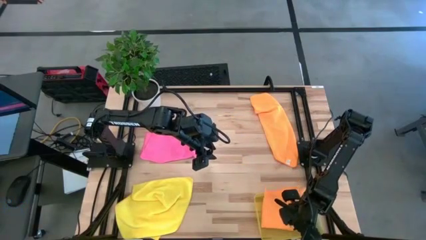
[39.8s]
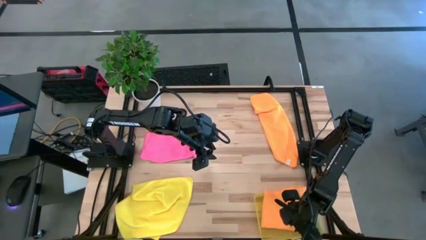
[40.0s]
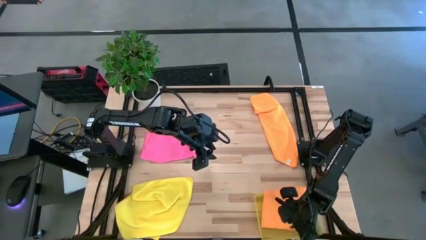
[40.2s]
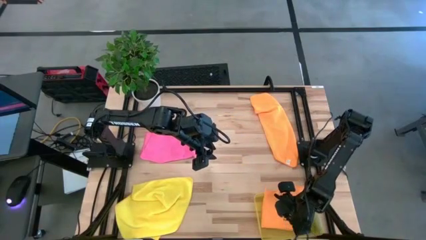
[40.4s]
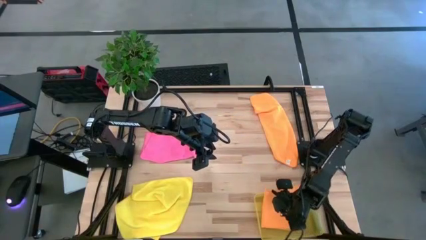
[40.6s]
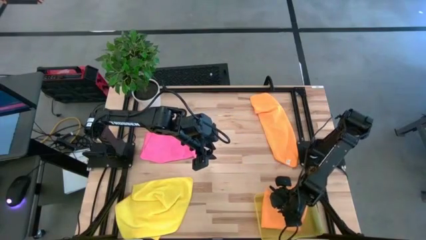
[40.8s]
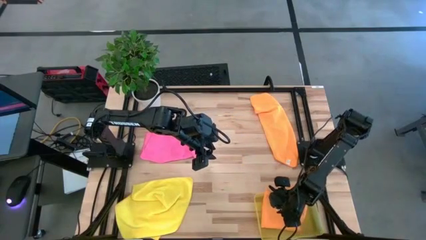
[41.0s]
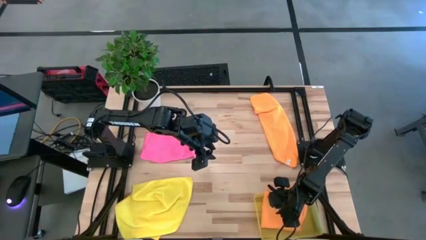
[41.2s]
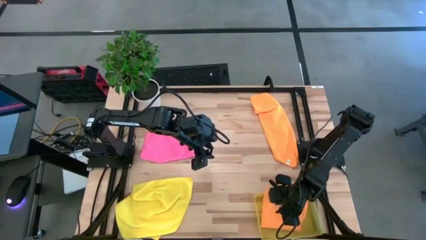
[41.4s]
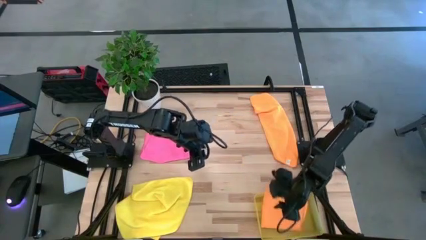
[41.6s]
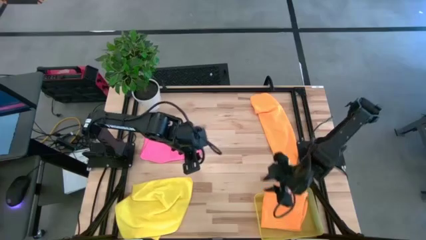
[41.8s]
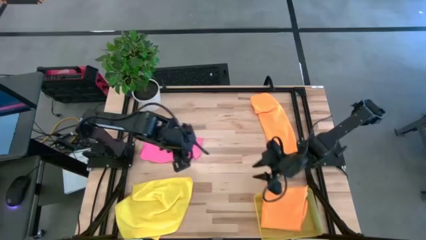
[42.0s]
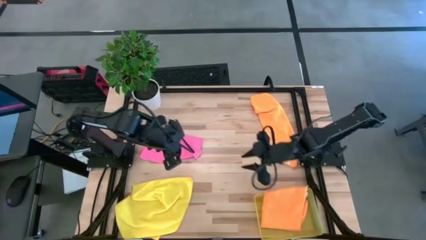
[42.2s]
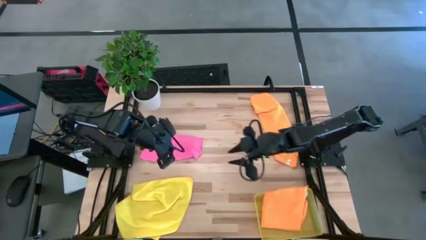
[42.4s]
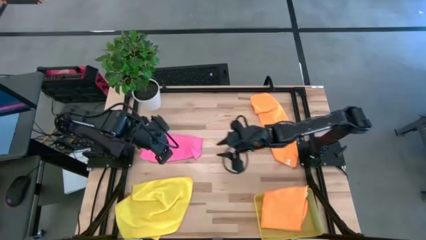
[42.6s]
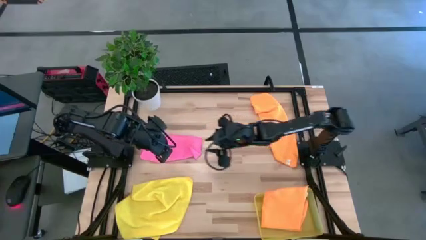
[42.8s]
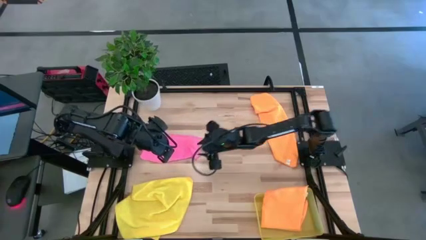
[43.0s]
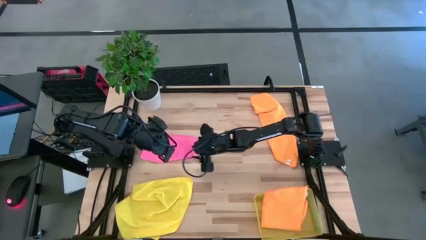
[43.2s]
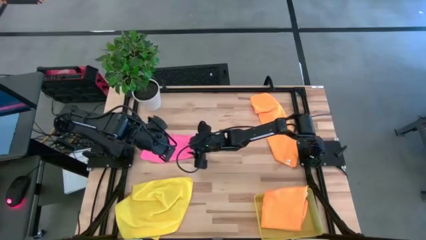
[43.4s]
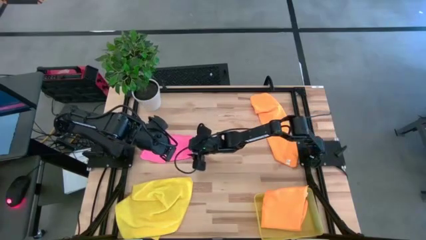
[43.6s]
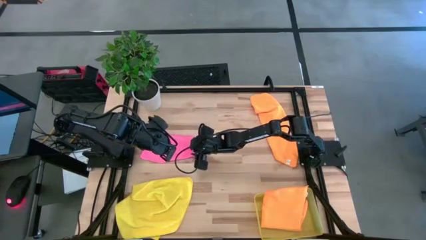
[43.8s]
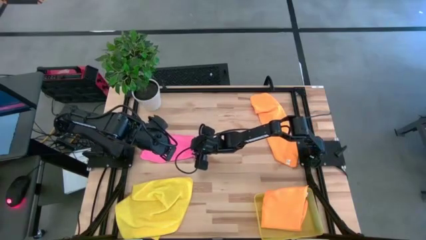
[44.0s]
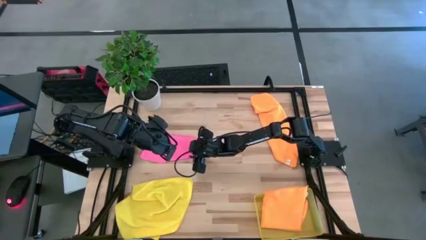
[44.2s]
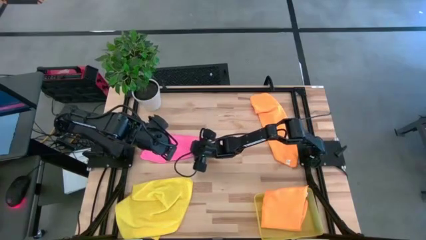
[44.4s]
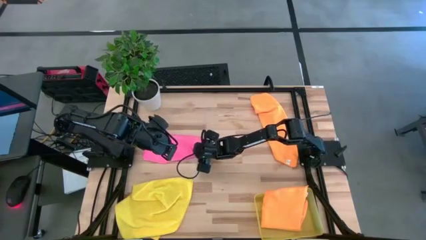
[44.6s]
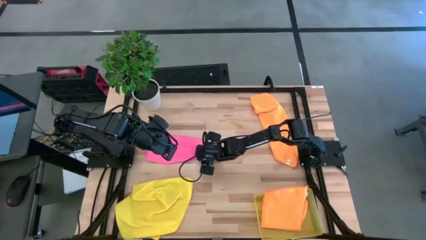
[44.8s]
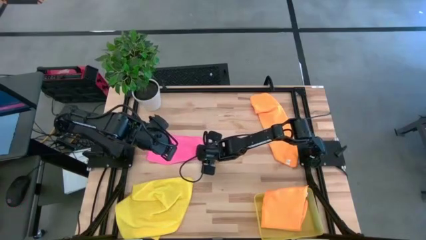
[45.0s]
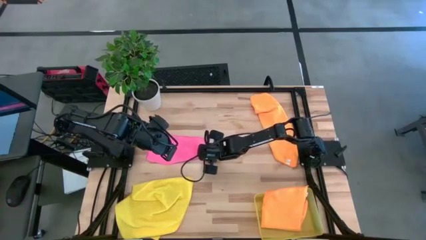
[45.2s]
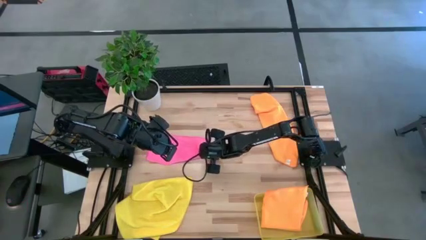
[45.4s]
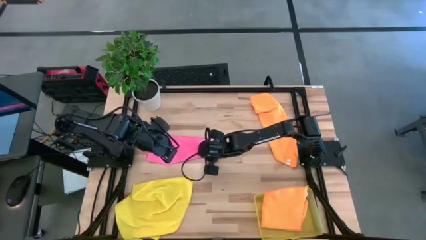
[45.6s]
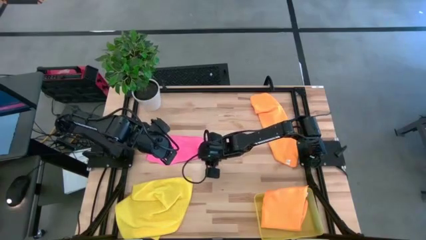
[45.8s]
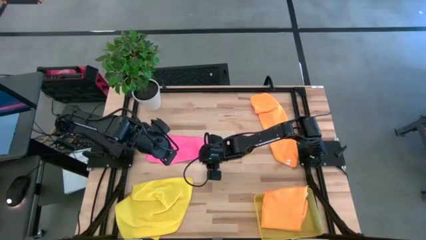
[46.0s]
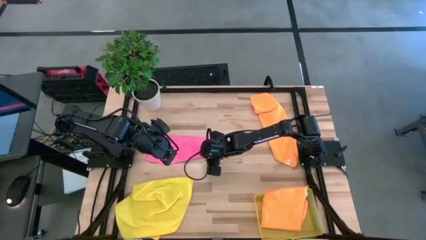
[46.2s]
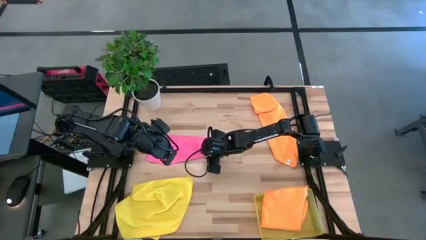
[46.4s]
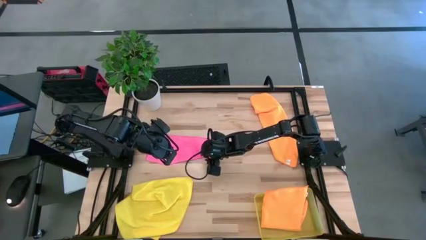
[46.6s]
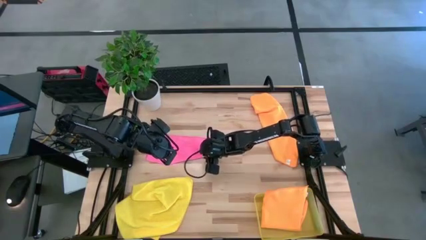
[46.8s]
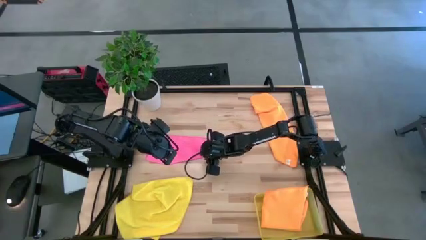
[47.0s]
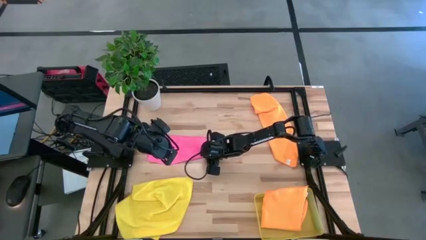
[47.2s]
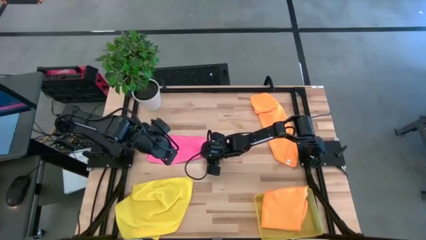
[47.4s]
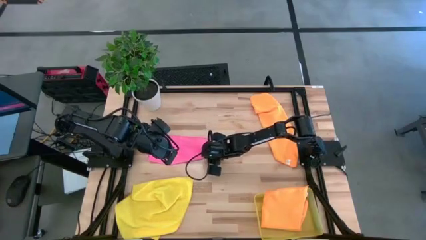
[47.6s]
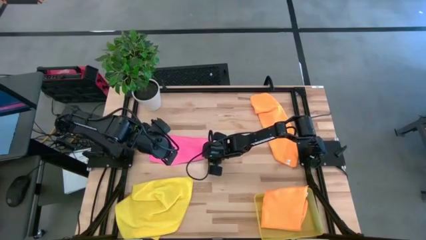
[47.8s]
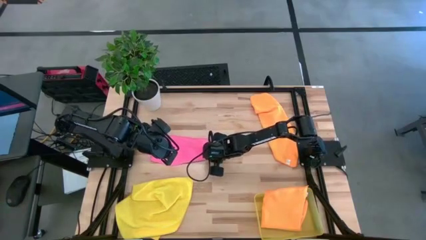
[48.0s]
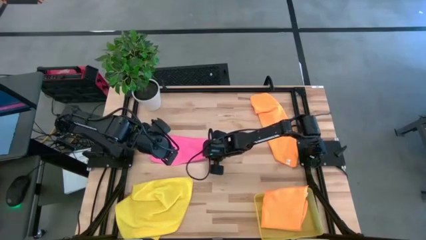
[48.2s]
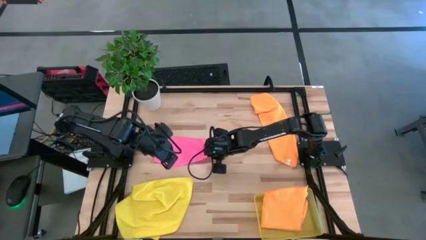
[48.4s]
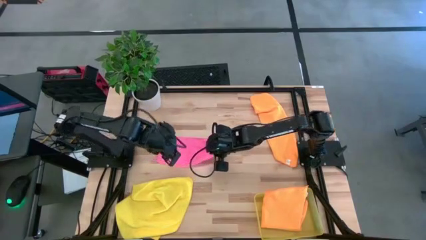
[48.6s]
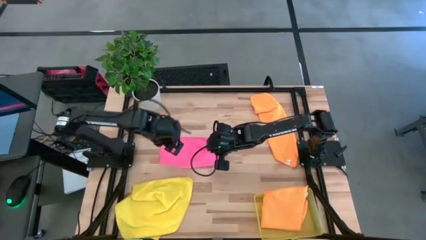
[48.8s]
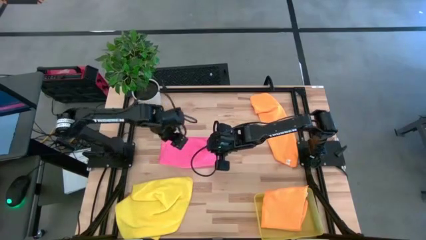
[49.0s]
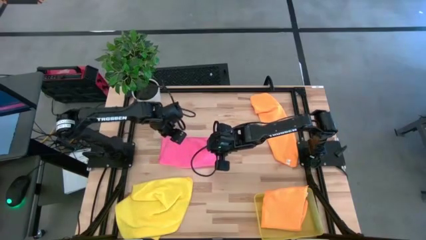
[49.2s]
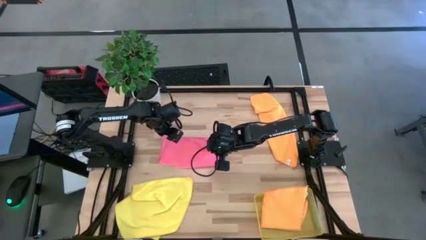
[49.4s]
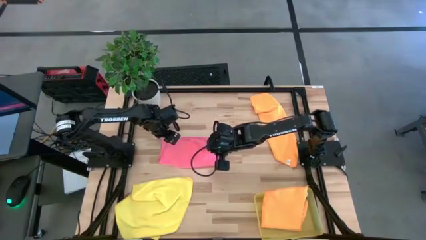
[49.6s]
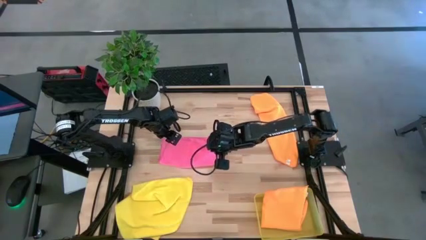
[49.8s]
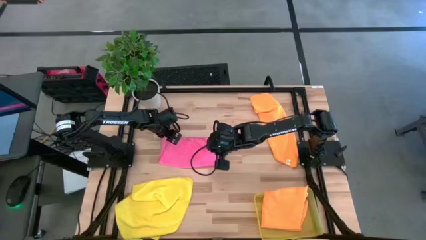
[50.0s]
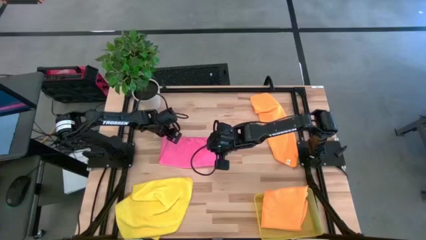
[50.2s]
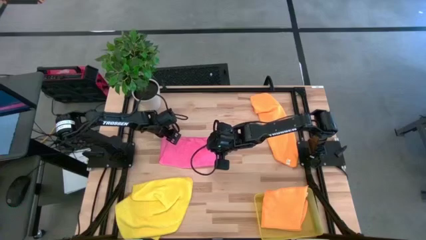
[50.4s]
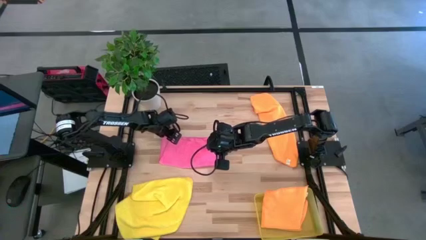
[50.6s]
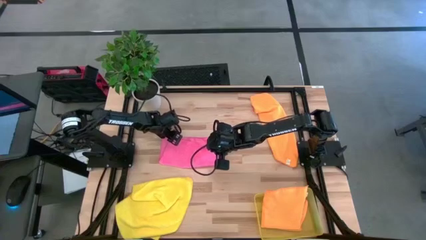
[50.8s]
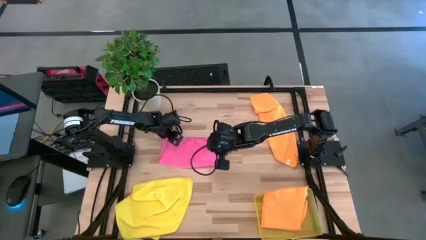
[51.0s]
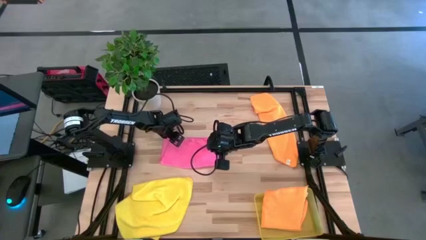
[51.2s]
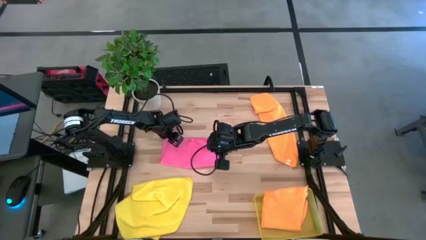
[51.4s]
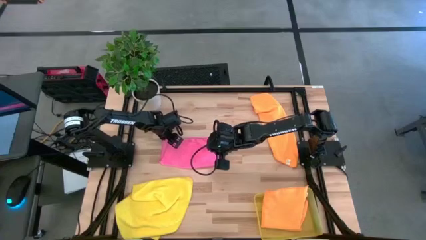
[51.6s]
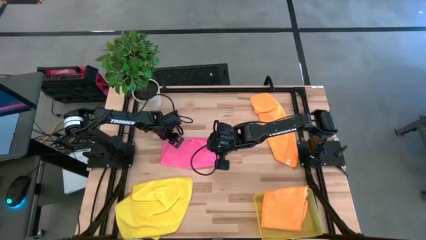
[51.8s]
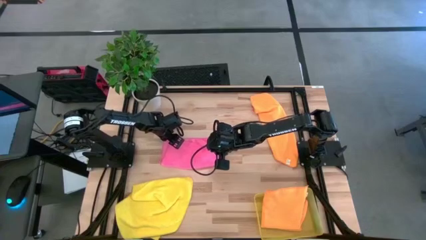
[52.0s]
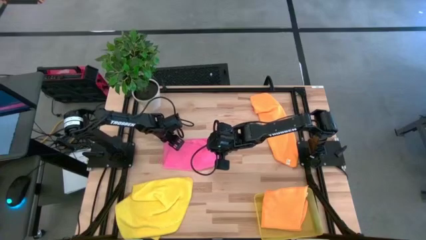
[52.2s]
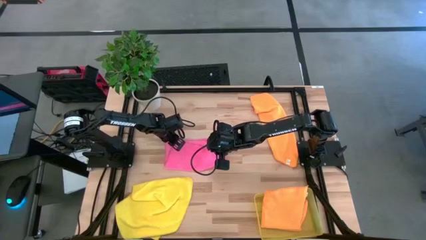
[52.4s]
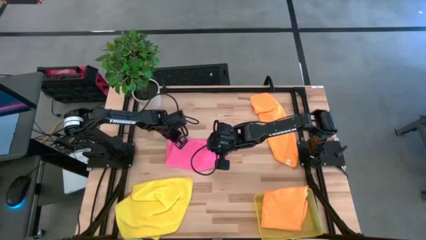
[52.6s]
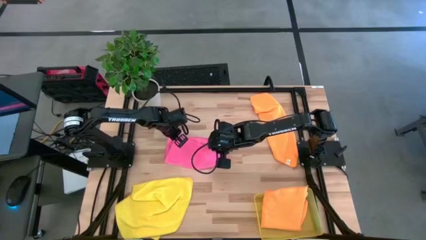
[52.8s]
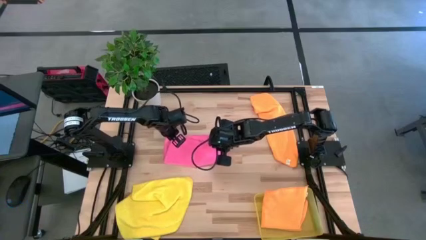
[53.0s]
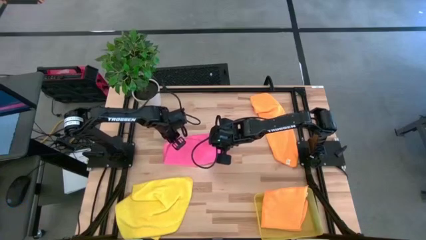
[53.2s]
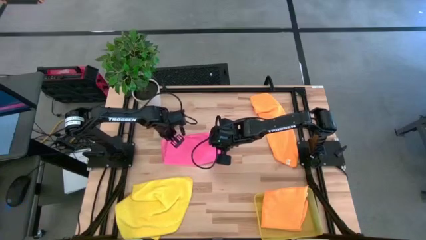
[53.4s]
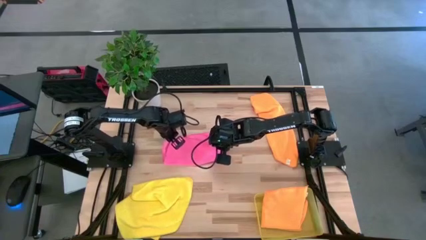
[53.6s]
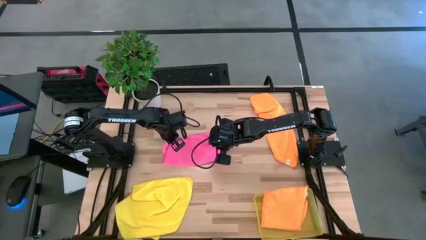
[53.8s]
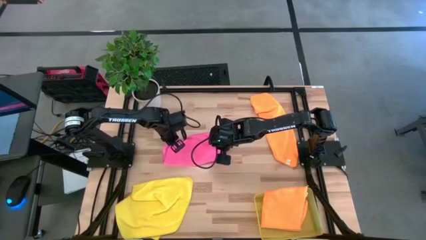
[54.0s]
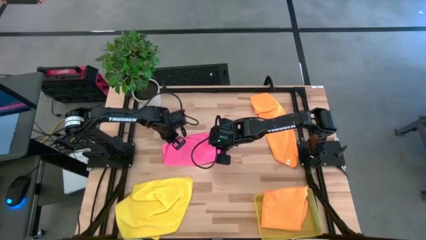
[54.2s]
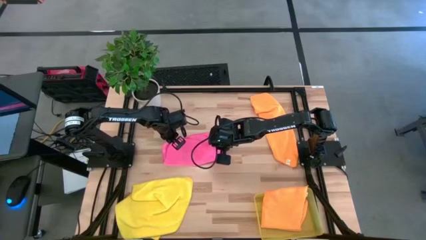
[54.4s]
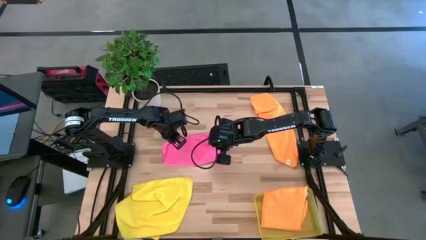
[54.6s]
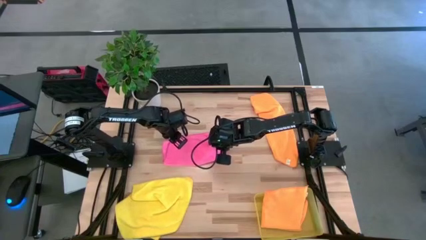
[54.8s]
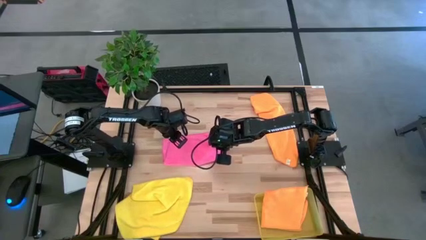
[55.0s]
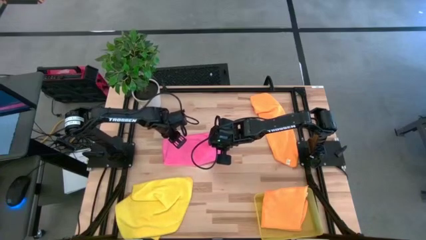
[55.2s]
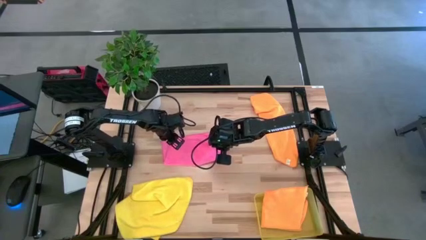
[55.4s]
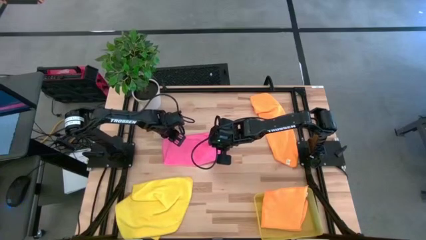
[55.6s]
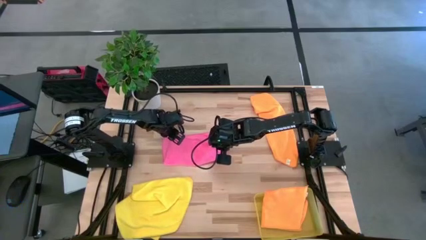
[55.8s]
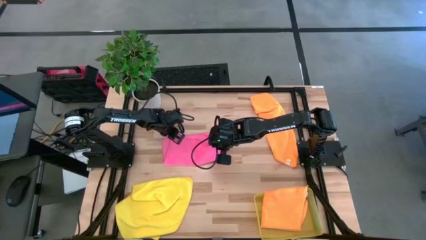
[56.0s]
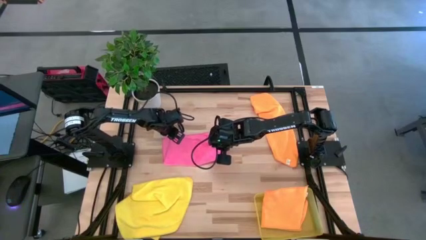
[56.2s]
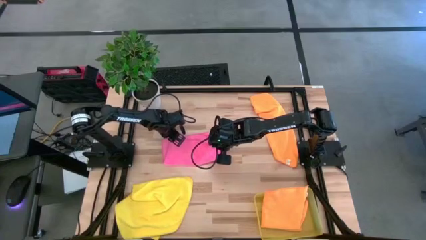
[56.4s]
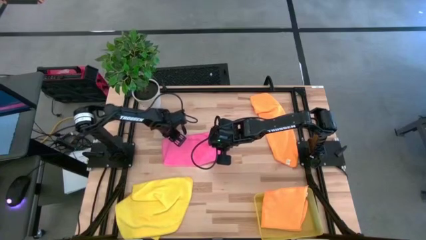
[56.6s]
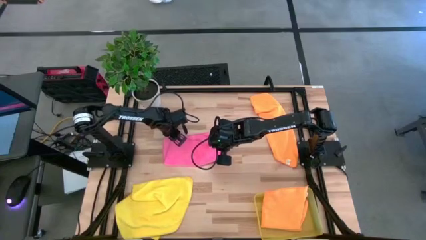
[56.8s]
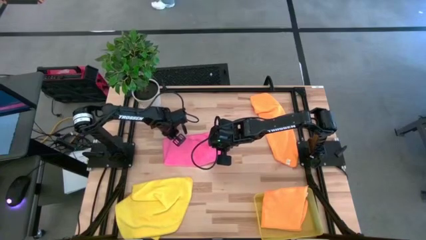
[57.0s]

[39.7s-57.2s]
Task: Fold microfiber towels
Fold the pink microfiber cloth
